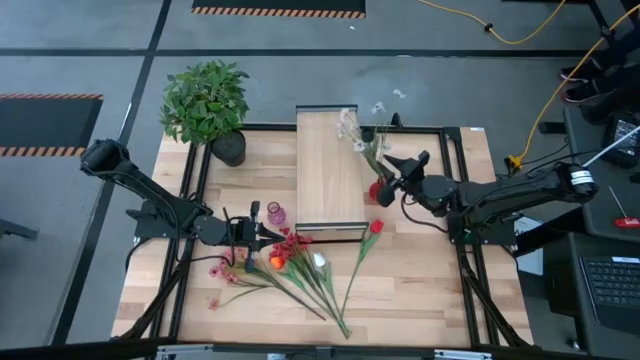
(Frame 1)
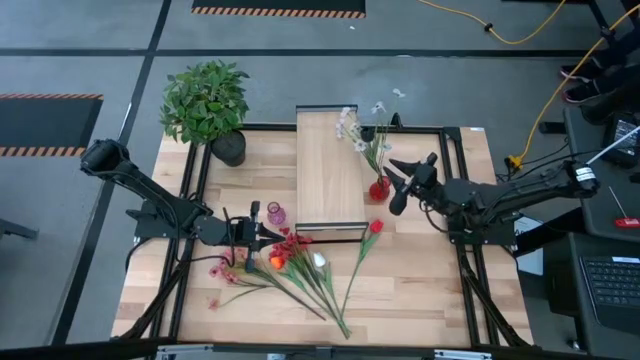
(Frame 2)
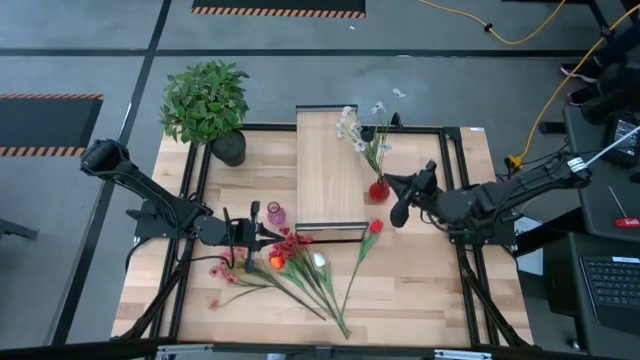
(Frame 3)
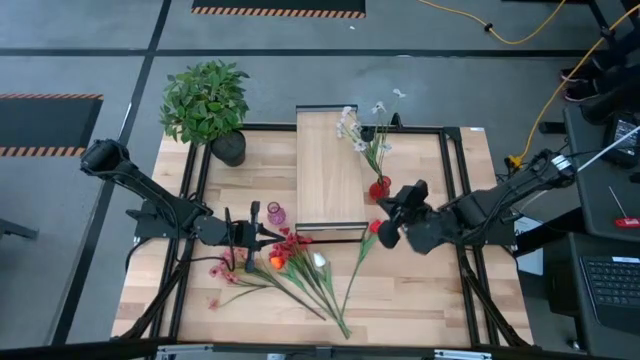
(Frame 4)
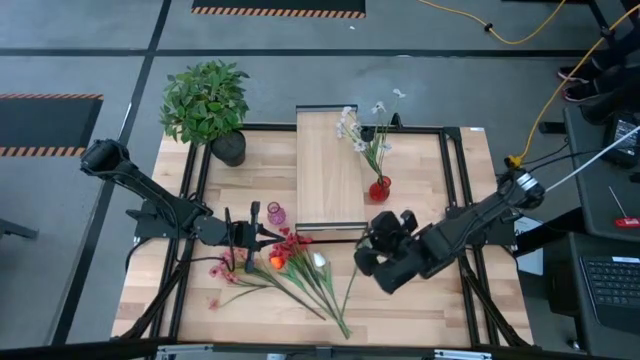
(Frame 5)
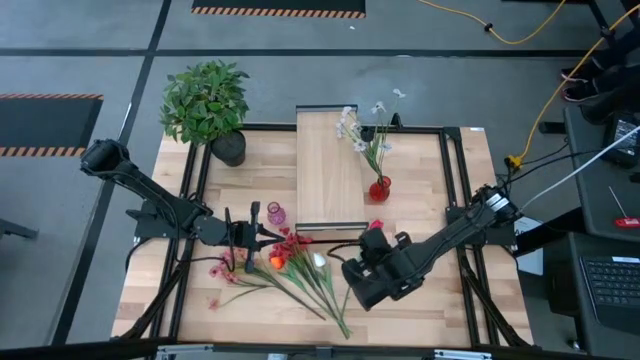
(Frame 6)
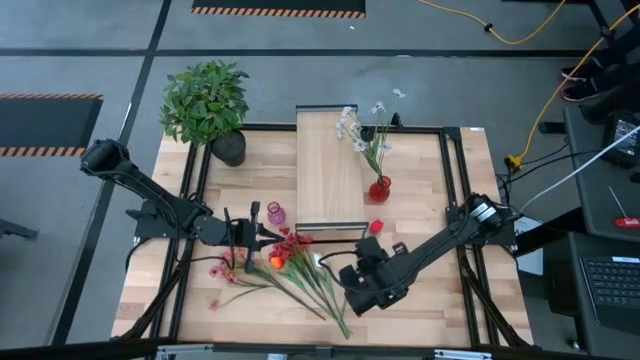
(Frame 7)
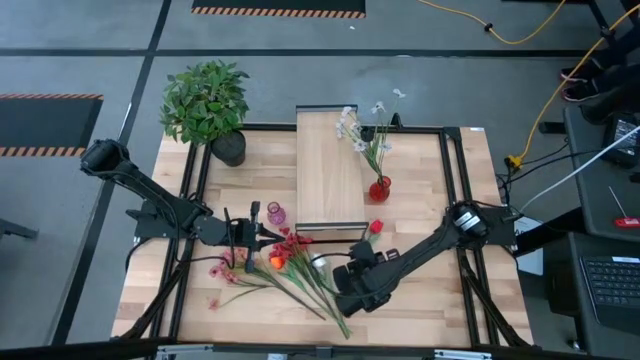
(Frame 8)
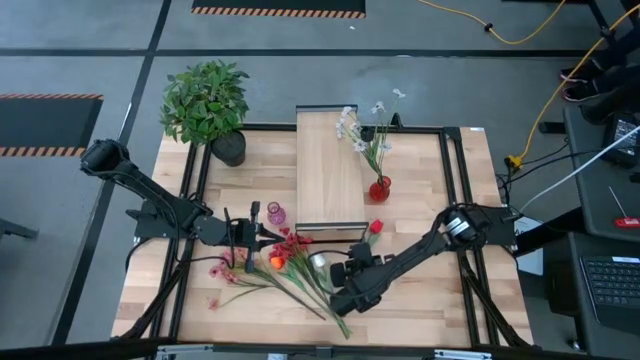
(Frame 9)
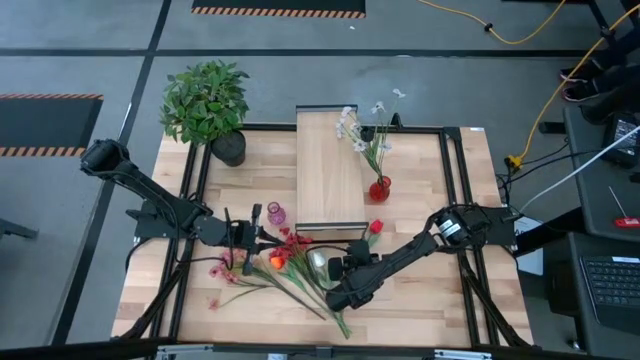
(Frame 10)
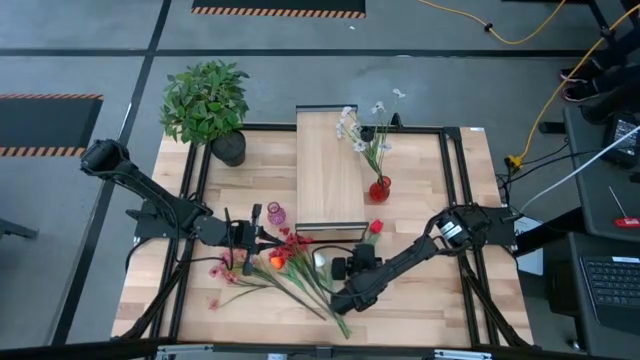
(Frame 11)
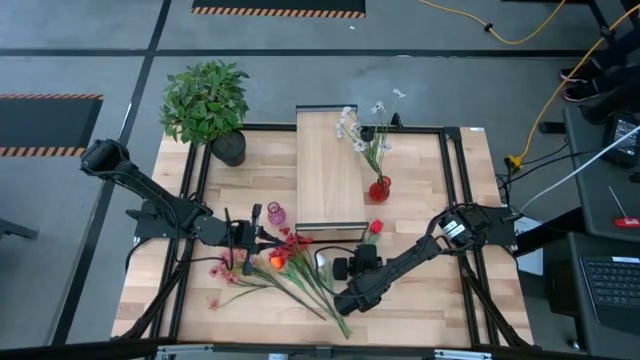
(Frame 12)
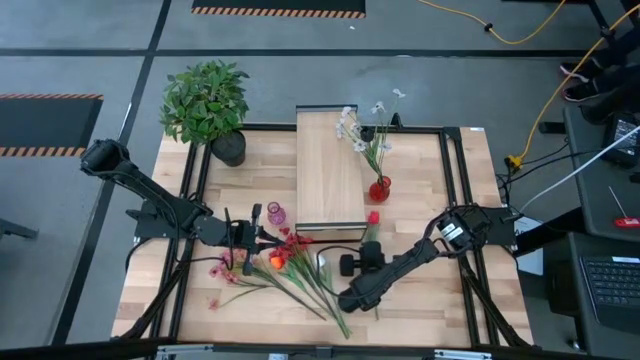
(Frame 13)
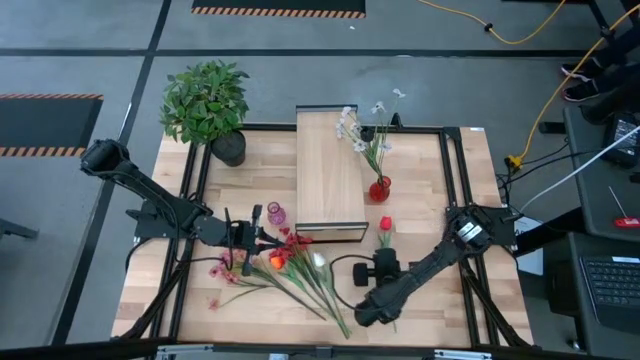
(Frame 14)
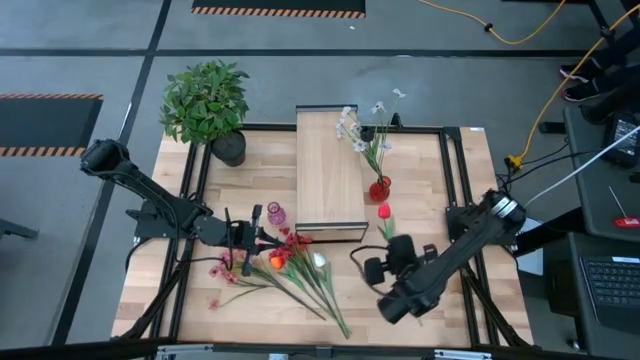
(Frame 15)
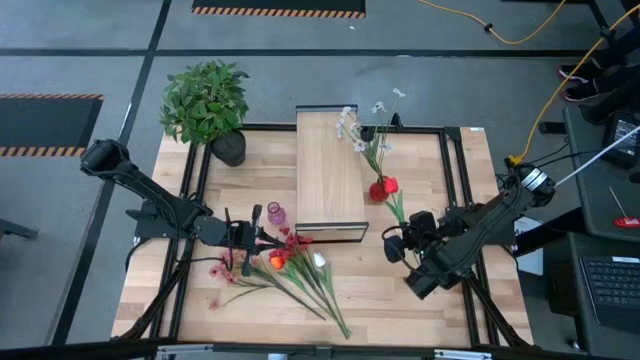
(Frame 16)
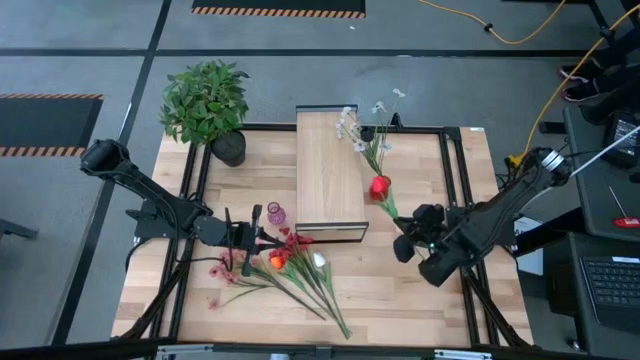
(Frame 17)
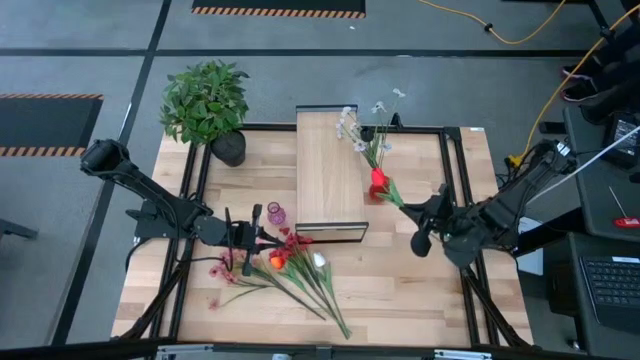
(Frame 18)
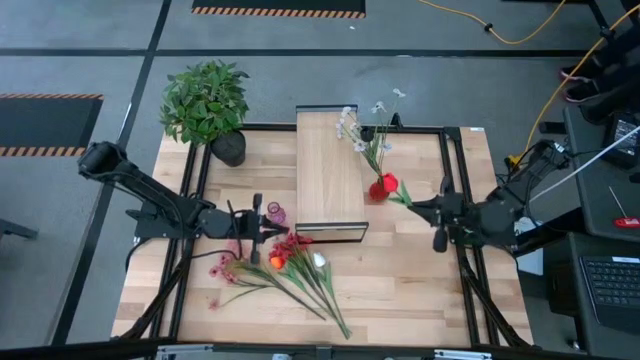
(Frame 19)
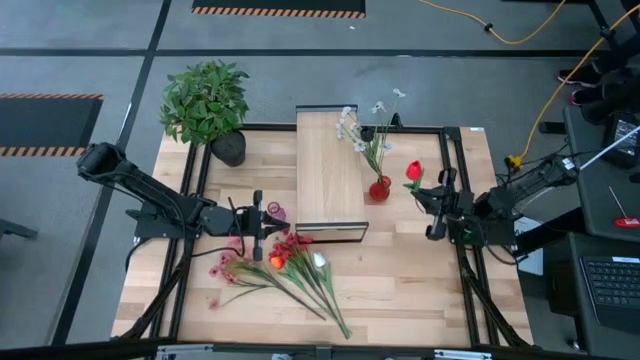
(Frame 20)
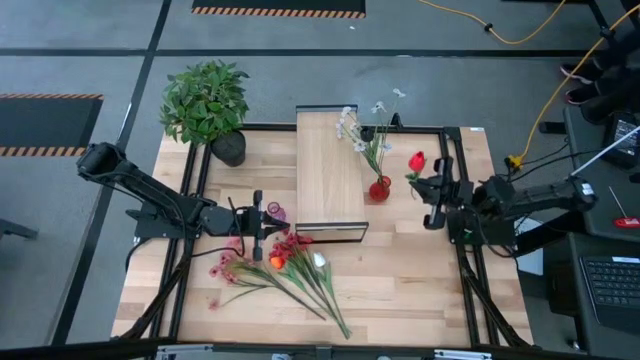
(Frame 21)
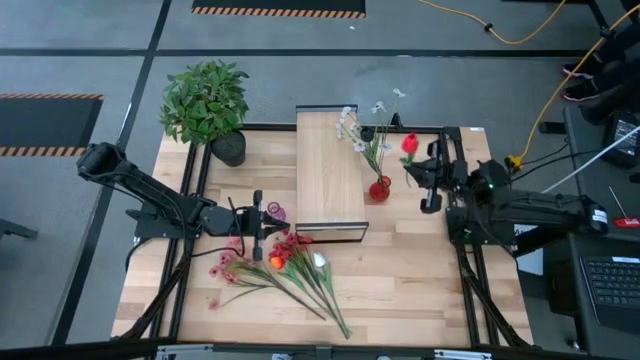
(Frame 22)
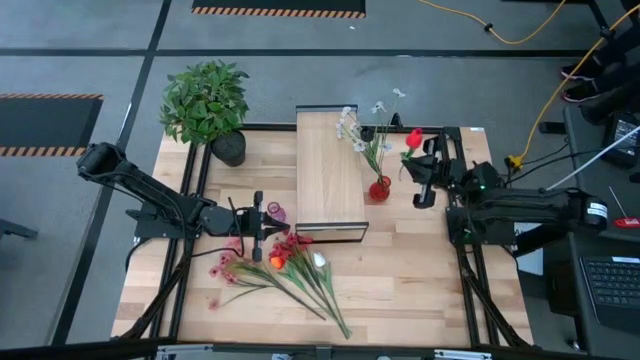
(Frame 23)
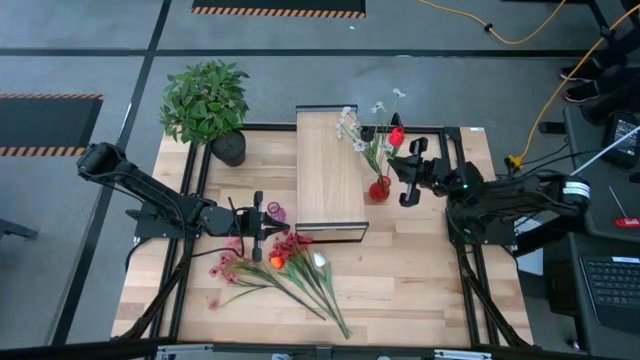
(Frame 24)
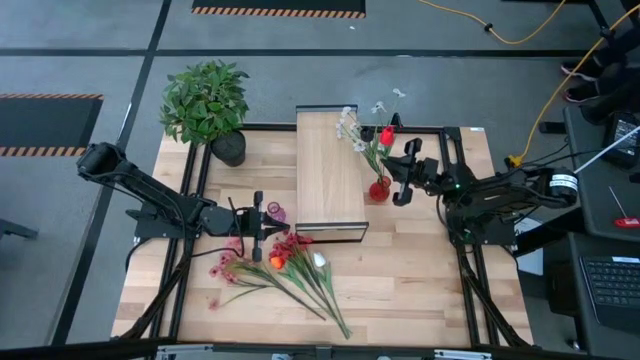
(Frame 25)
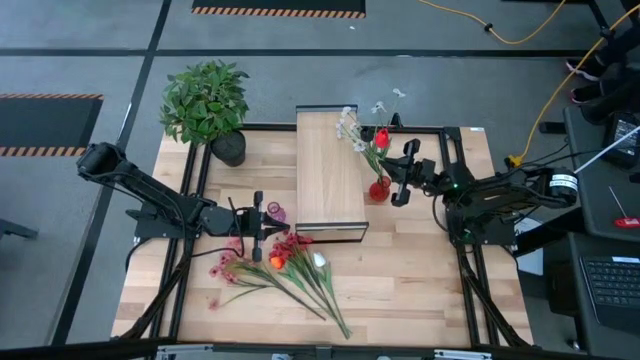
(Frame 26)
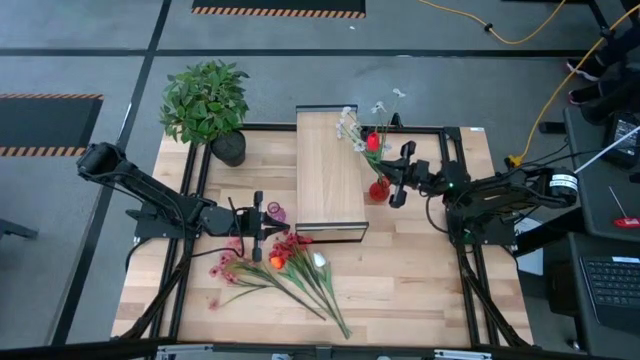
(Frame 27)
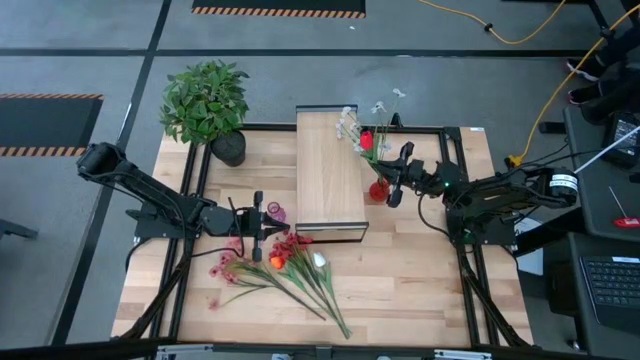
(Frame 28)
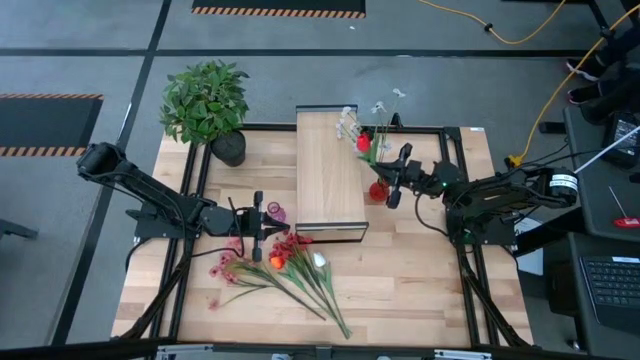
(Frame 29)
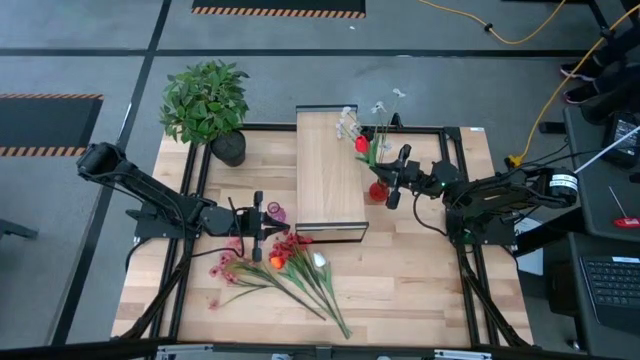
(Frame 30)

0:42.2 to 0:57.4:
Task: Pick and place flowers into a vace then onto a shelf
Put the red tulip into the red vase

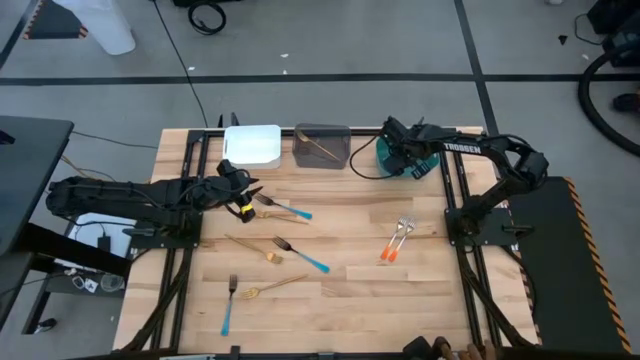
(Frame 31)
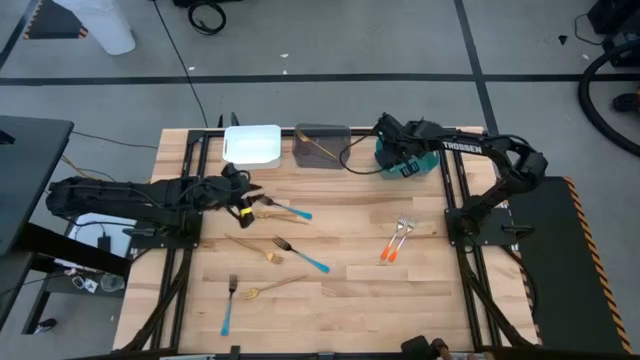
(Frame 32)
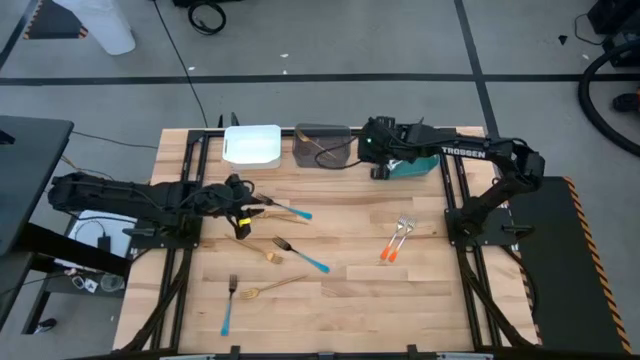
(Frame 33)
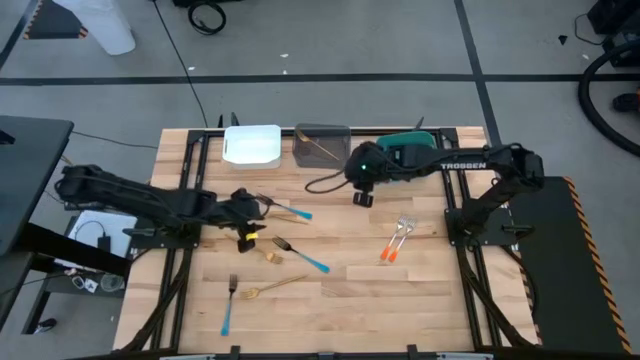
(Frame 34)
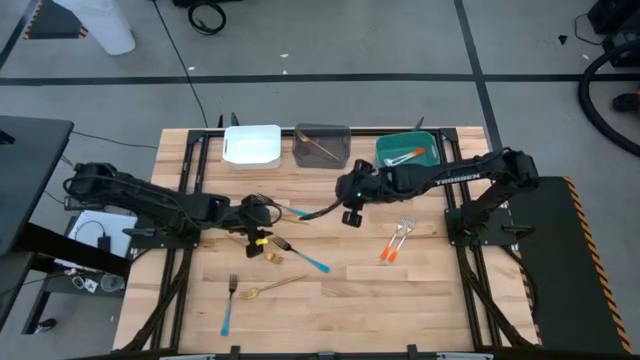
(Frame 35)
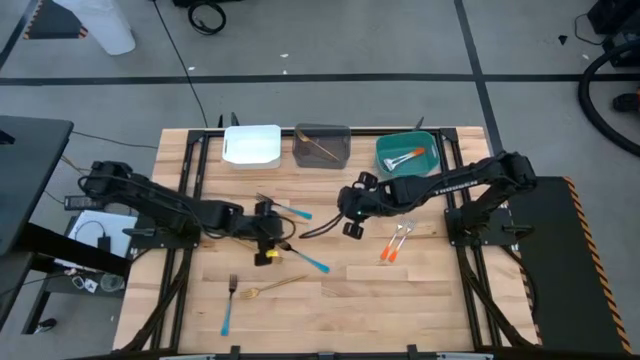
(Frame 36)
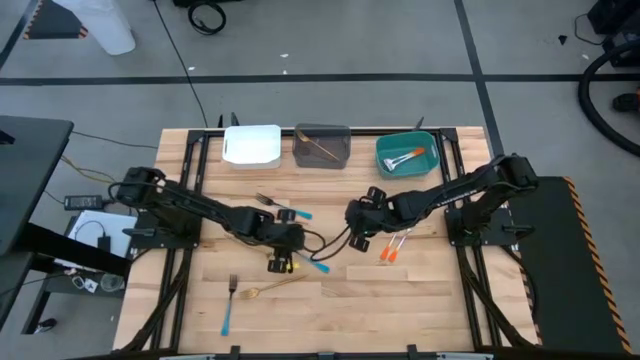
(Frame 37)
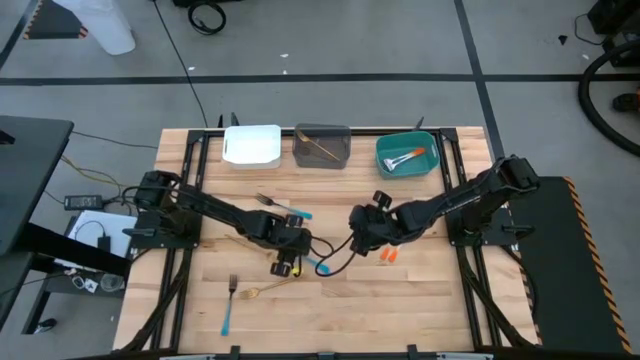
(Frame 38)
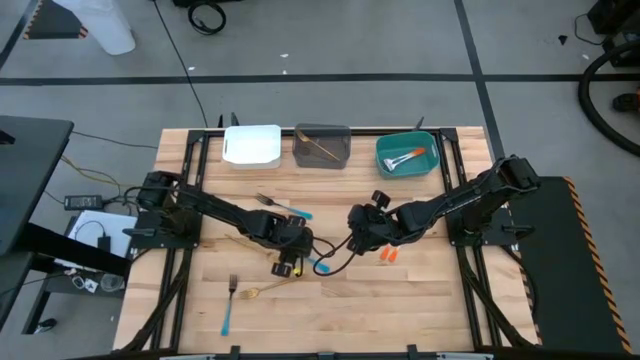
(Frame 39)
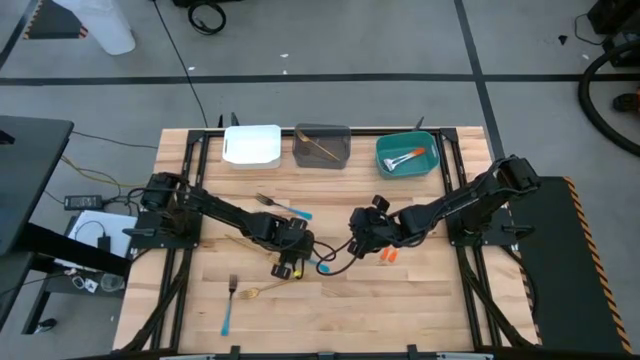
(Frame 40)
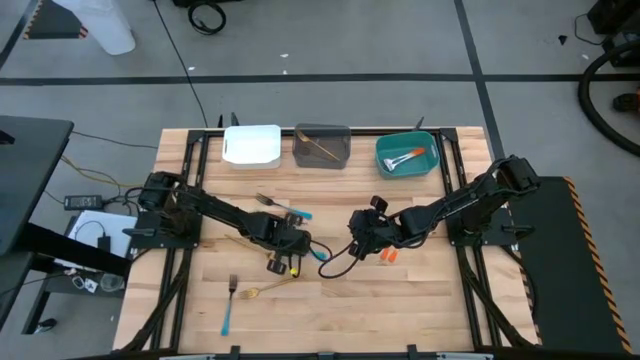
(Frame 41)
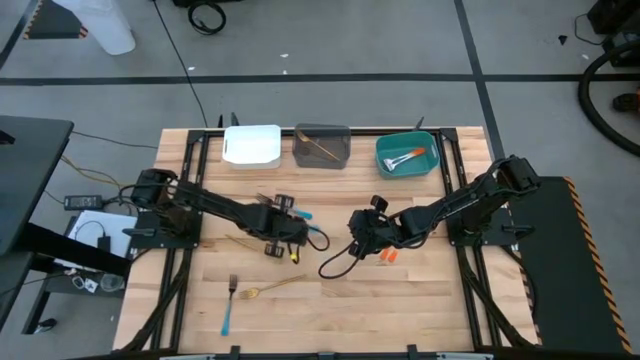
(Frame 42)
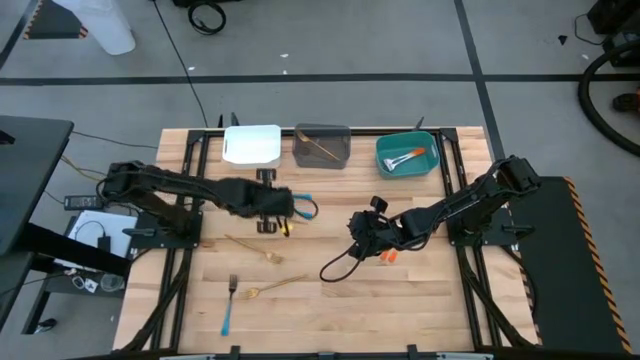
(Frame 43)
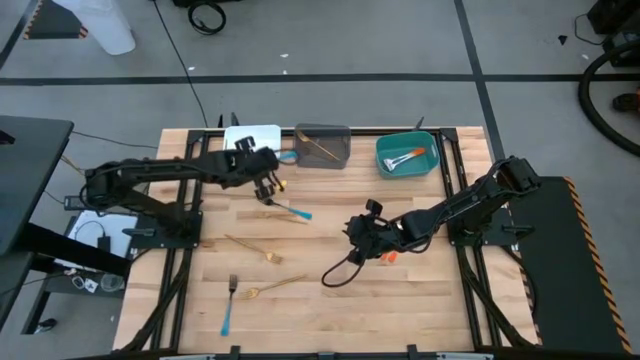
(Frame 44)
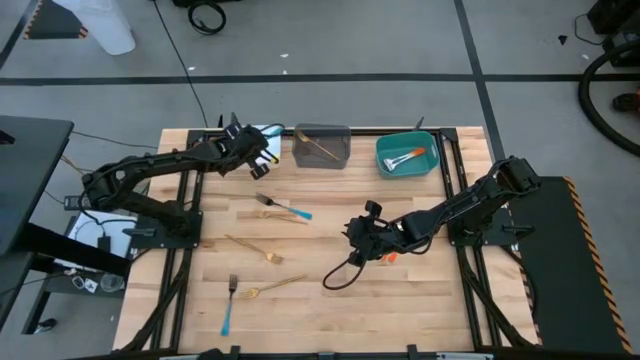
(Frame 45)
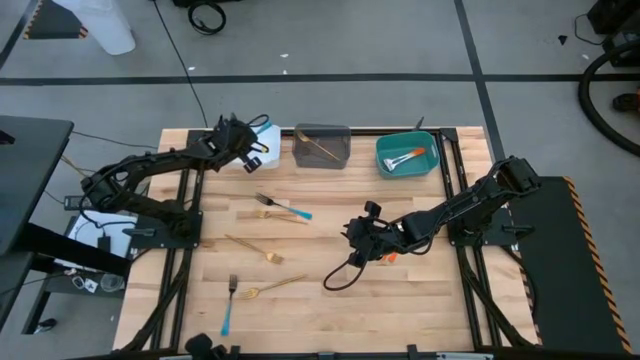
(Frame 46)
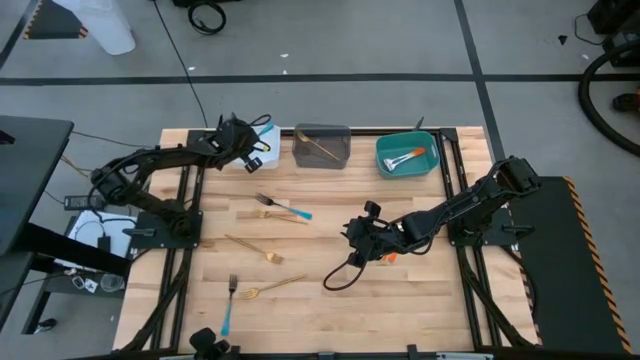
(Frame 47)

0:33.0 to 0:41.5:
Task: Sort silverware by color (type)
Put the middle blue fork into the white bin
